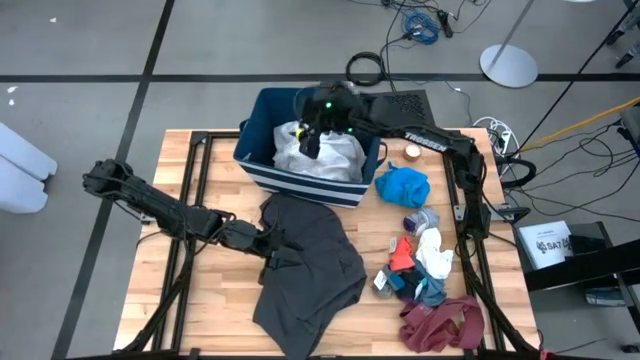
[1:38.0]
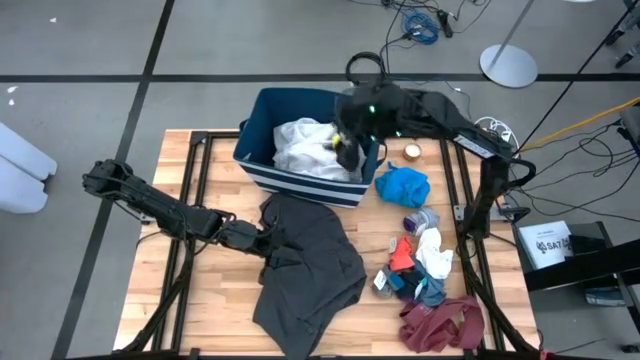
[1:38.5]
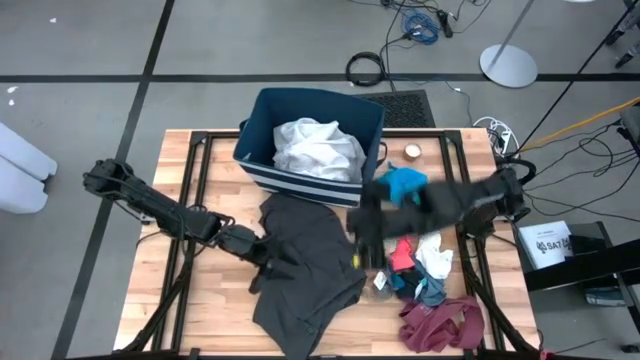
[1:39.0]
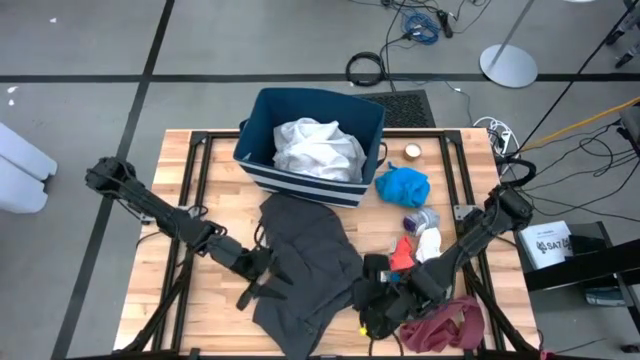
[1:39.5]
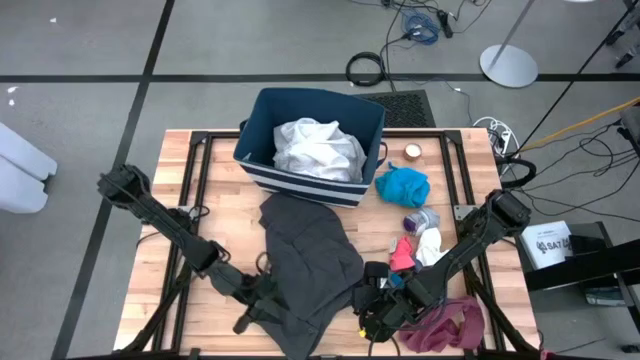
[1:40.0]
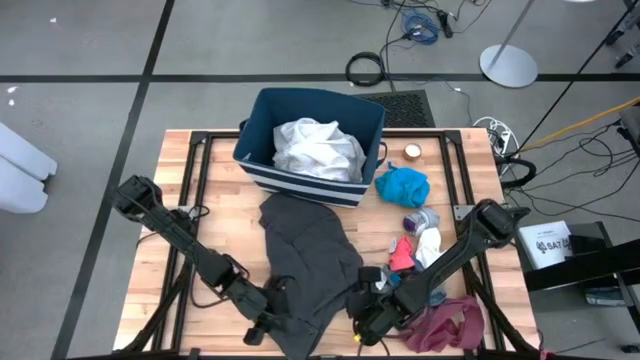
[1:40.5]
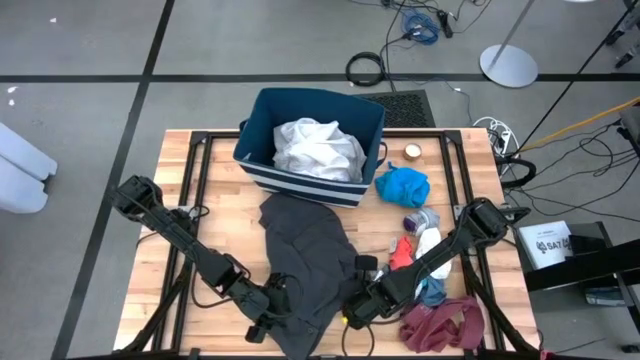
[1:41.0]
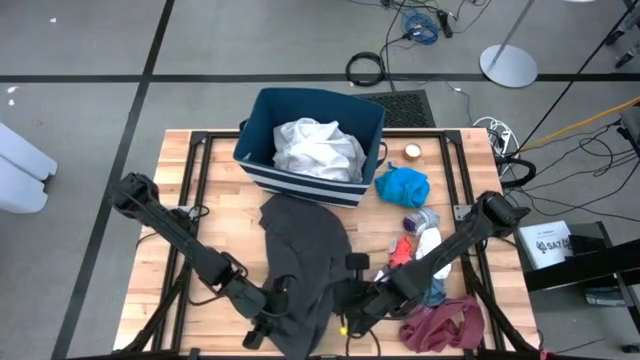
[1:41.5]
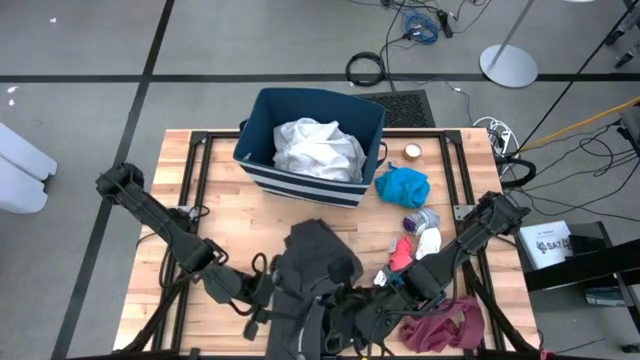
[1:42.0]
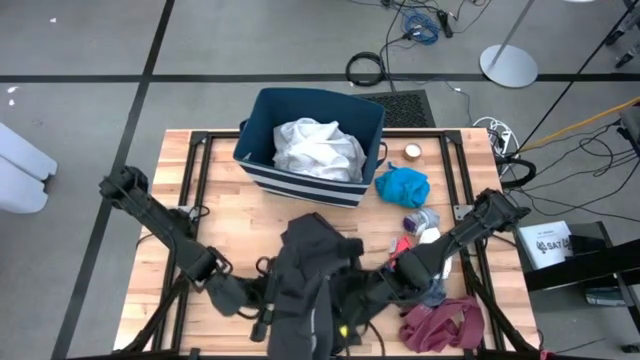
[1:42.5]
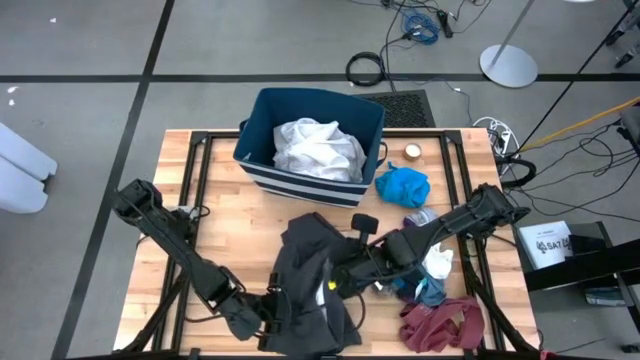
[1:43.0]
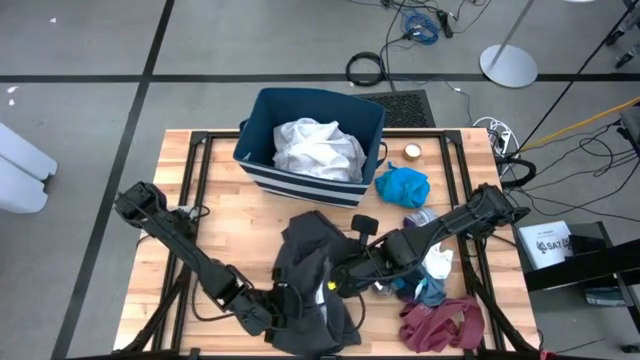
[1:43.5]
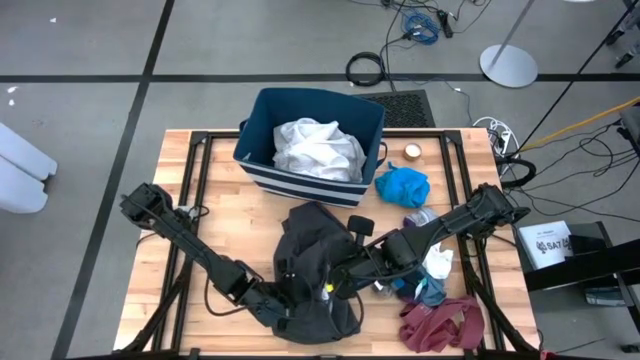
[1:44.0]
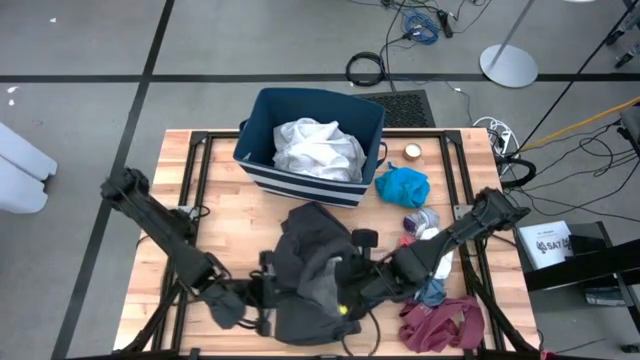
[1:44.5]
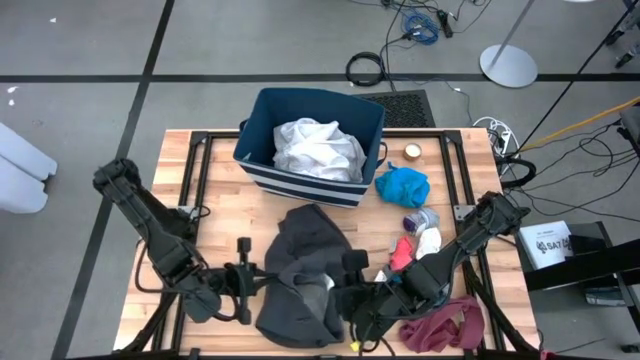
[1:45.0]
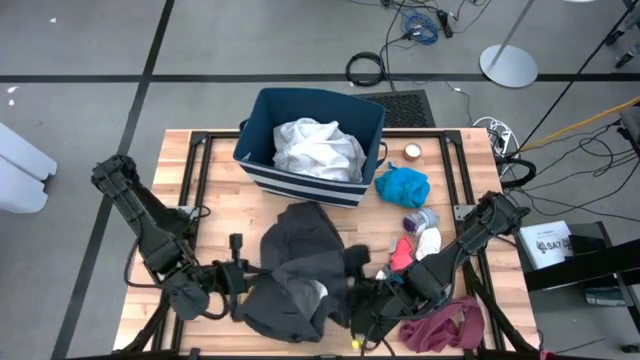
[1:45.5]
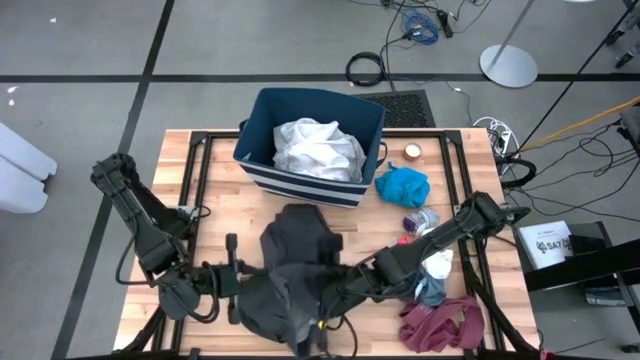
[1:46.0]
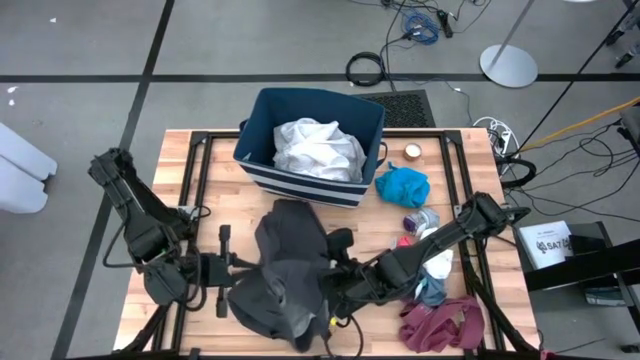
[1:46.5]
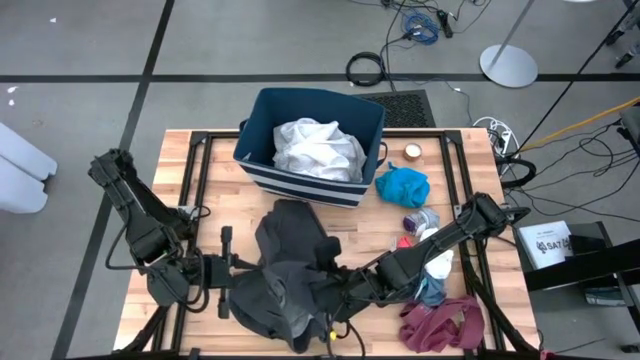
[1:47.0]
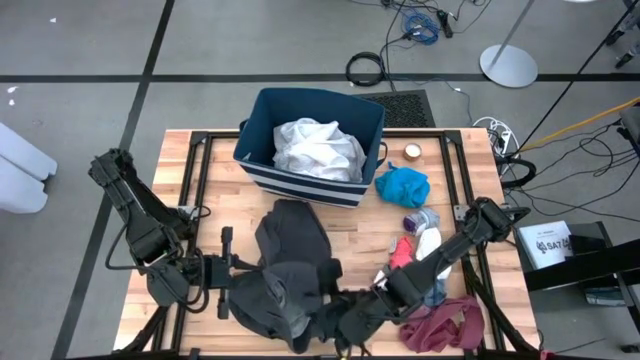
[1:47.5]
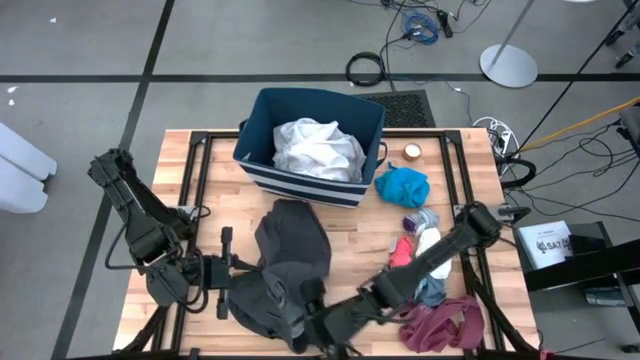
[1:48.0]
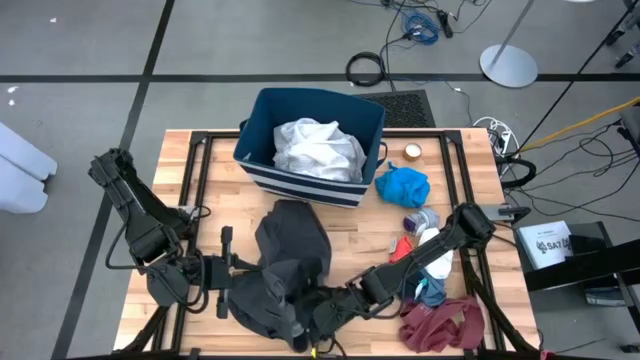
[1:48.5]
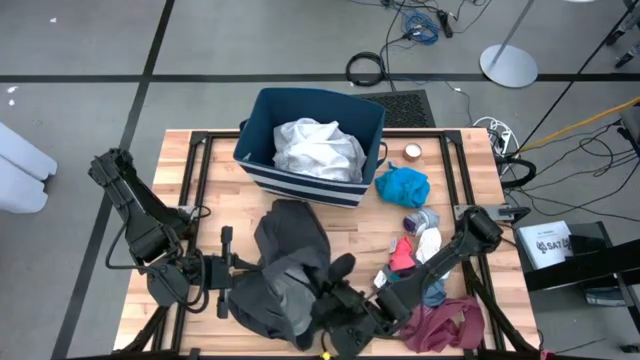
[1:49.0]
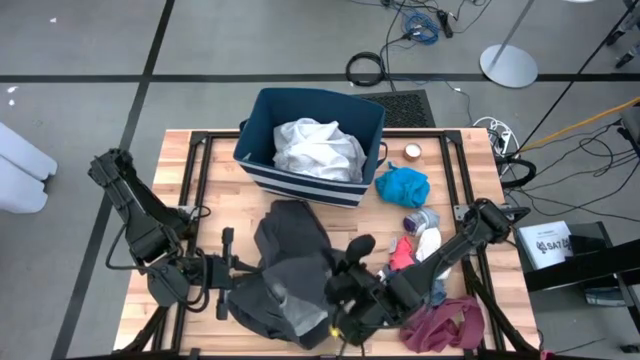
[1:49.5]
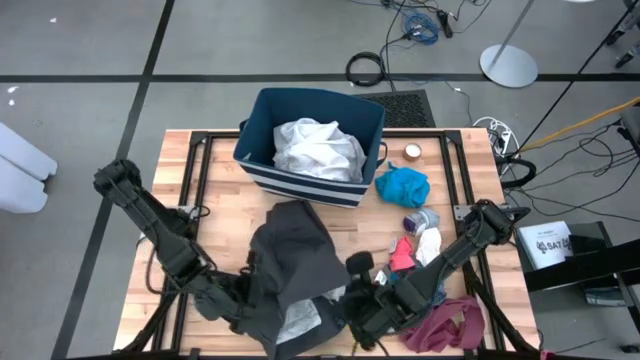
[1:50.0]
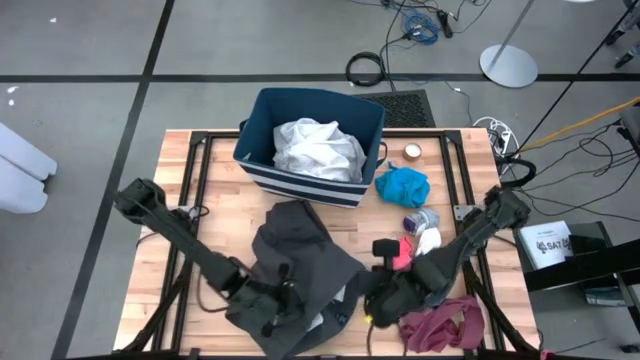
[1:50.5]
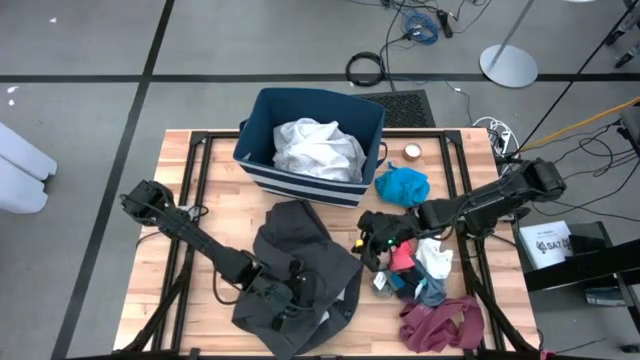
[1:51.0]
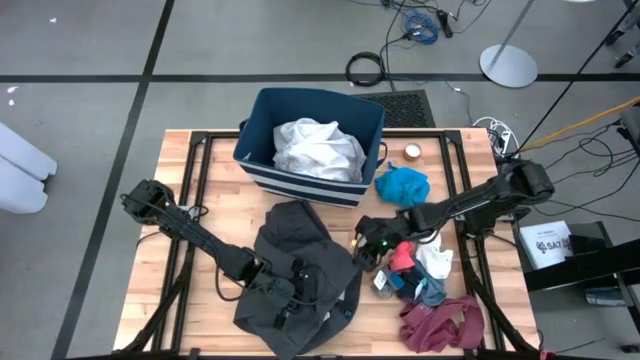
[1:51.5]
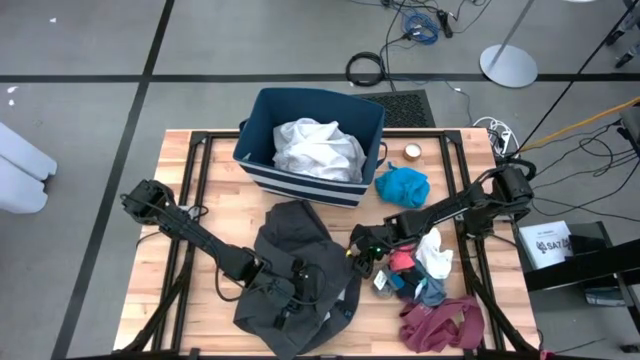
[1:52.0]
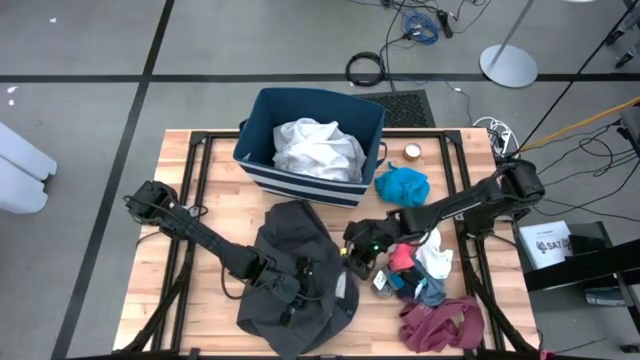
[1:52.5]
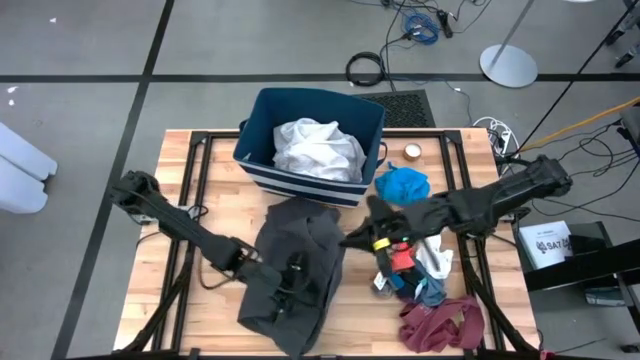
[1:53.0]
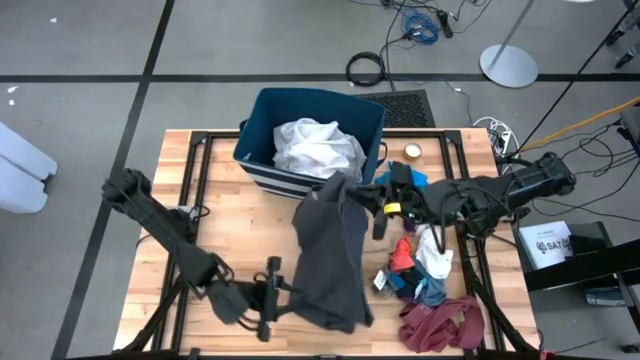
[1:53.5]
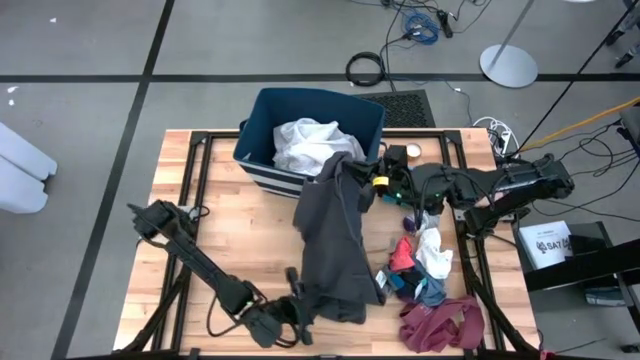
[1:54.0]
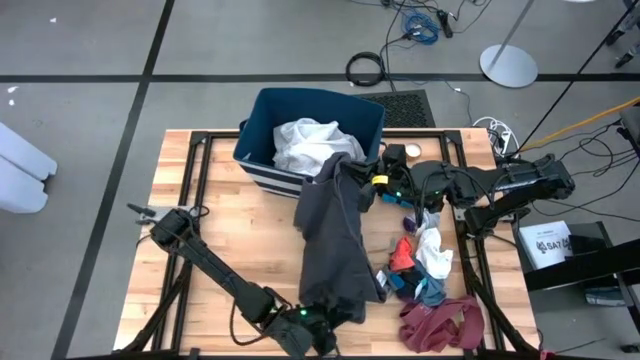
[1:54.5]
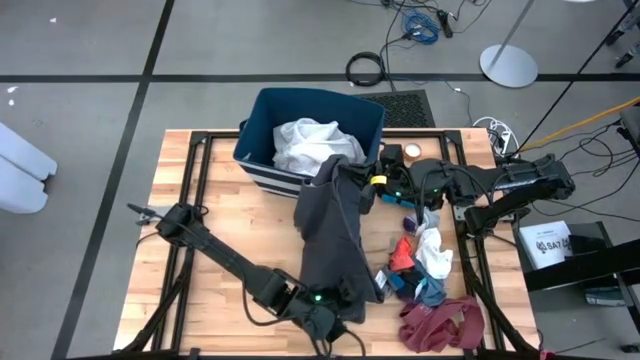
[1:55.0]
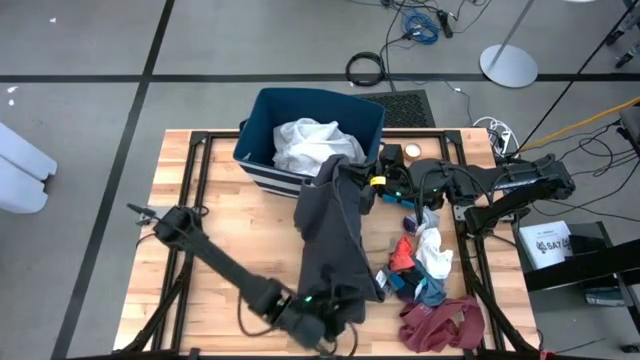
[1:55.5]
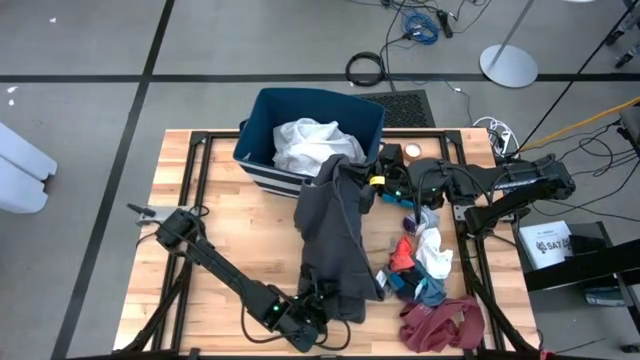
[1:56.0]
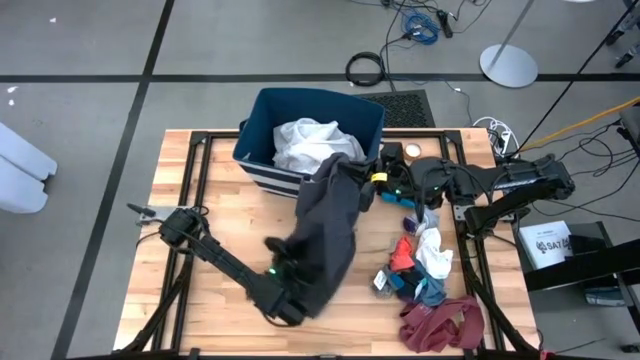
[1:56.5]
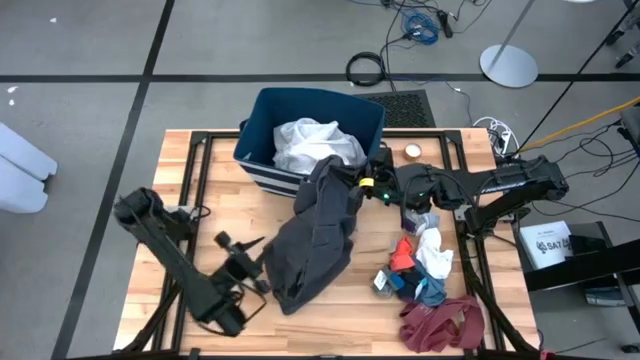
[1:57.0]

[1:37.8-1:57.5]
Task: Sort clothes
Put the black pants into the blue laundry bin

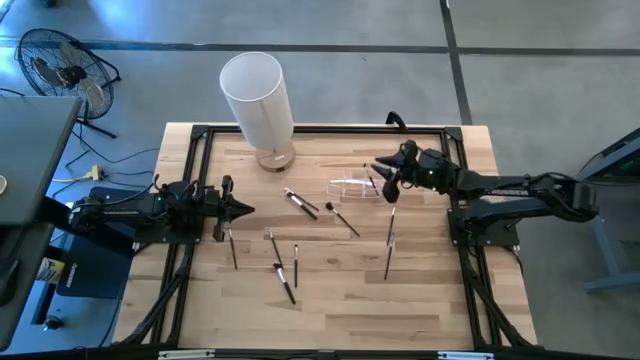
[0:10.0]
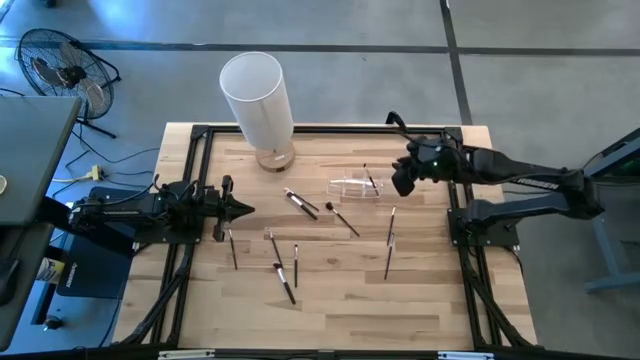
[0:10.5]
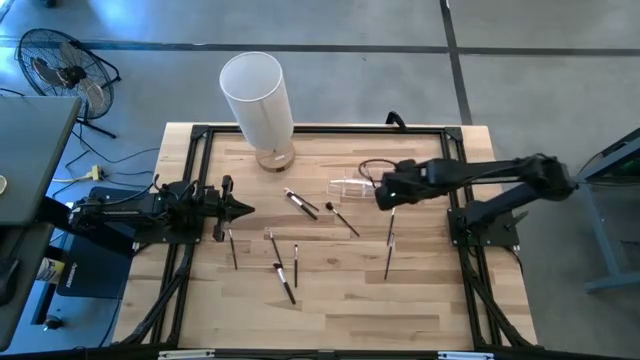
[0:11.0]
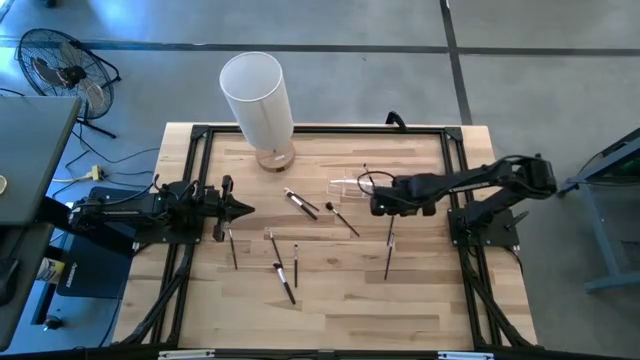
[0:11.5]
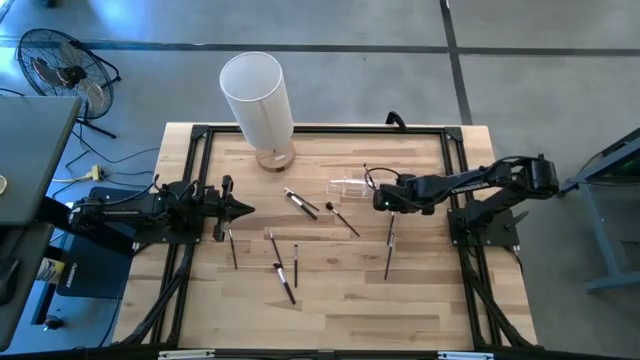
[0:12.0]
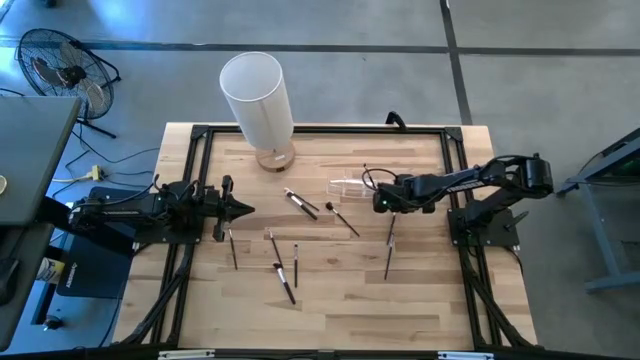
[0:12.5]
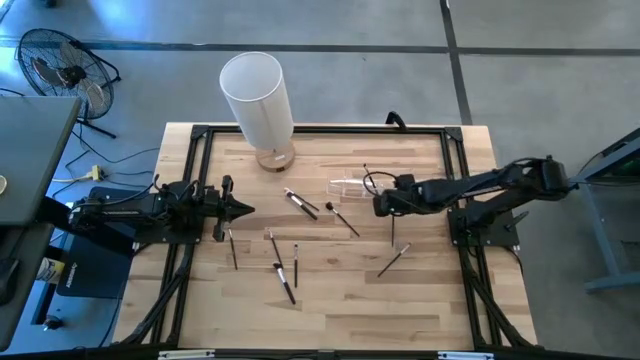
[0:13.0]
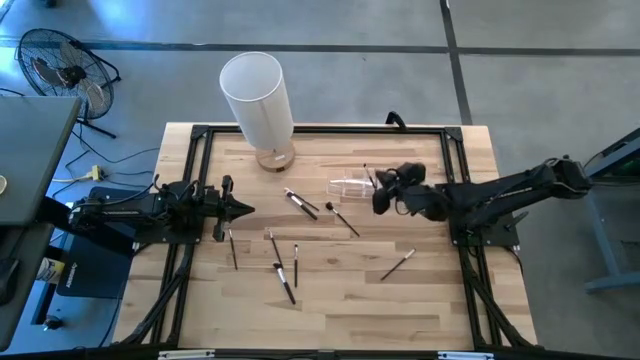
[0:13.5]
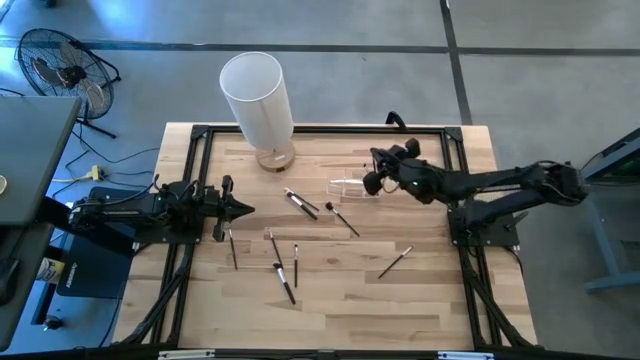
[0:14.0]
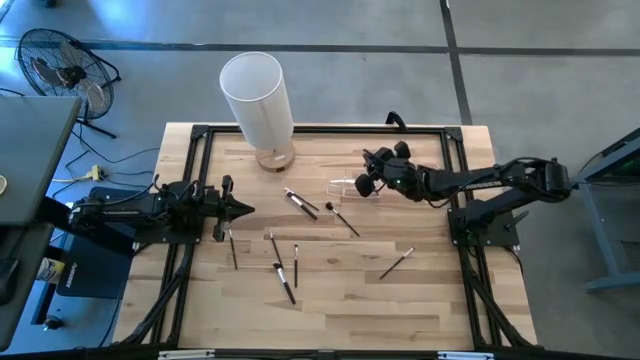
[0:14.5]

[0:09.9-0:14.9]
Task: Put items in baskets/containers
Put the black eyeshadow brush into the transparent organizer
